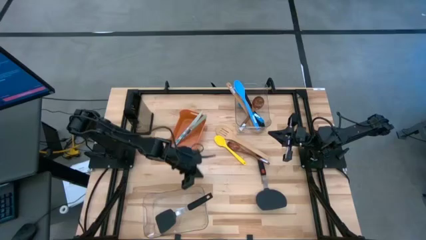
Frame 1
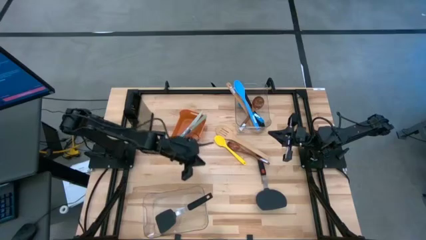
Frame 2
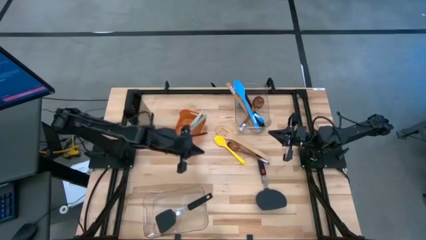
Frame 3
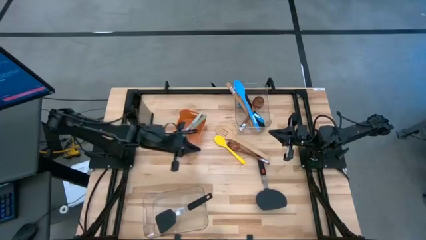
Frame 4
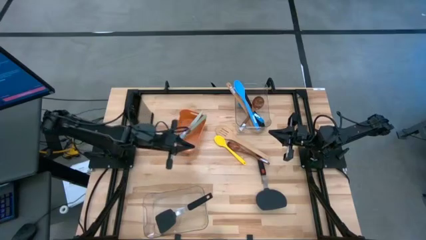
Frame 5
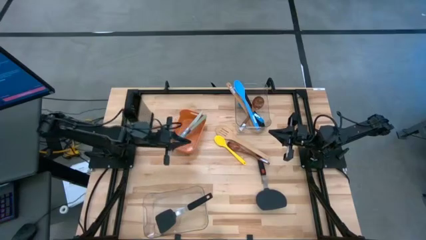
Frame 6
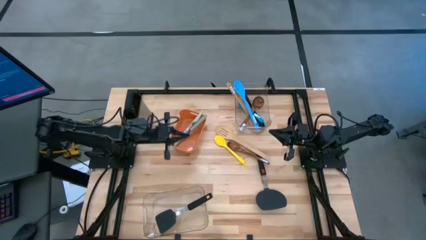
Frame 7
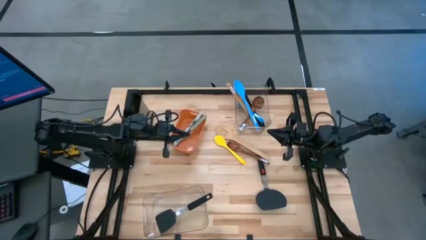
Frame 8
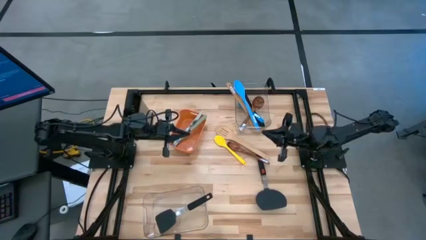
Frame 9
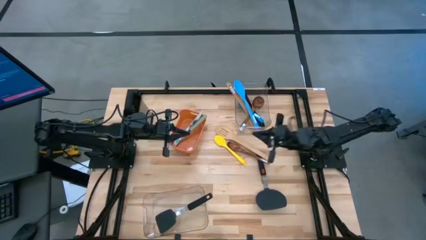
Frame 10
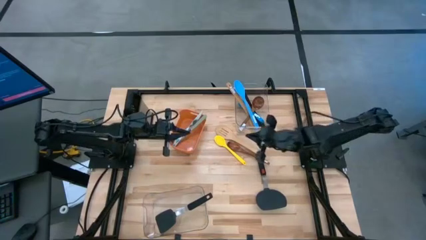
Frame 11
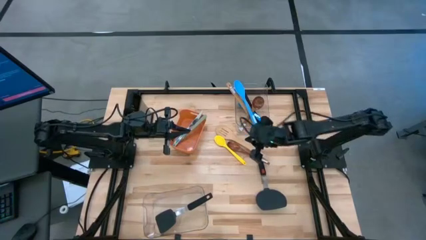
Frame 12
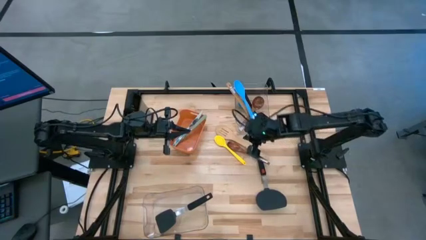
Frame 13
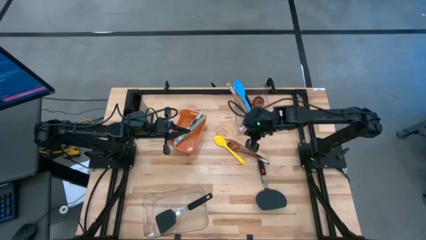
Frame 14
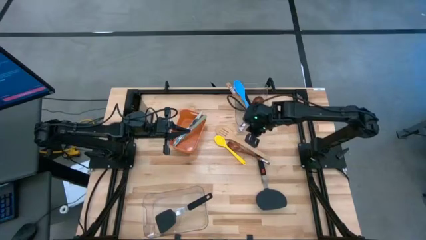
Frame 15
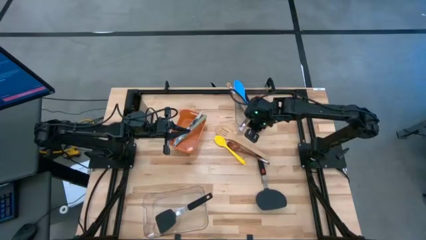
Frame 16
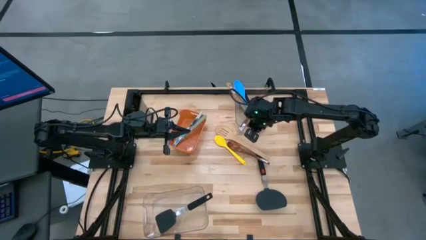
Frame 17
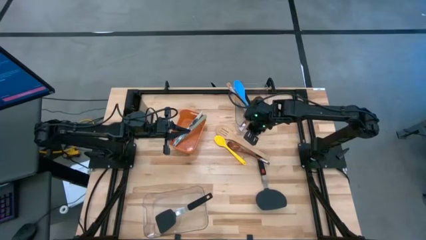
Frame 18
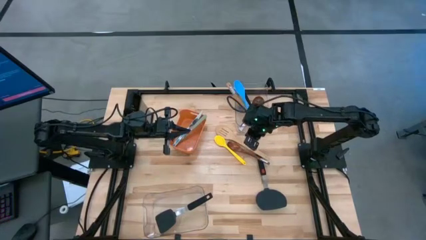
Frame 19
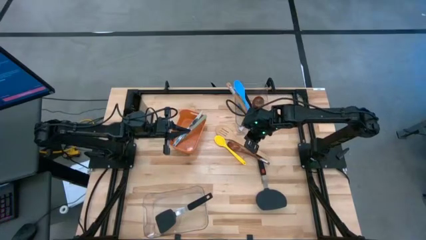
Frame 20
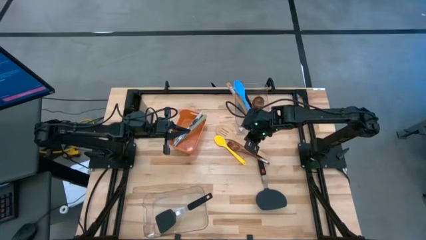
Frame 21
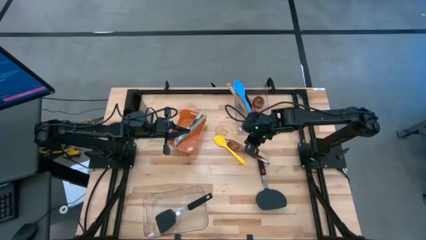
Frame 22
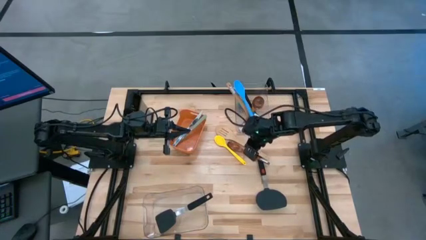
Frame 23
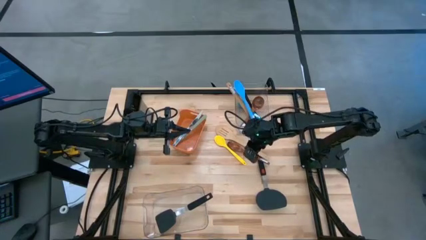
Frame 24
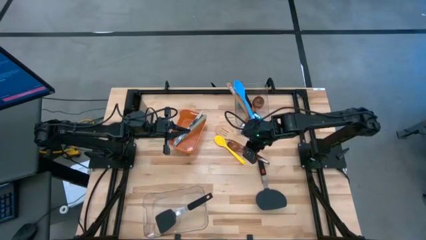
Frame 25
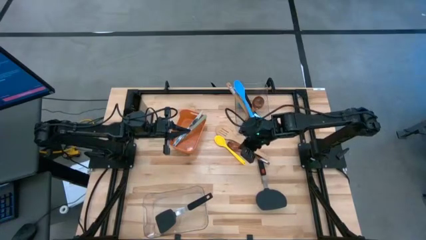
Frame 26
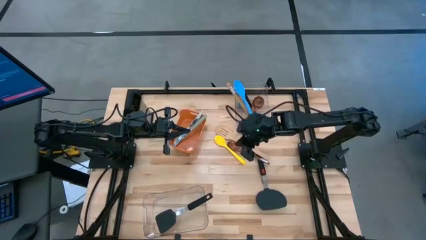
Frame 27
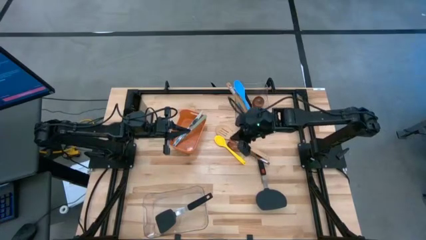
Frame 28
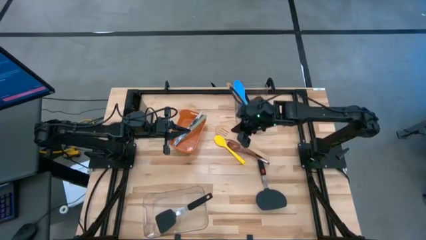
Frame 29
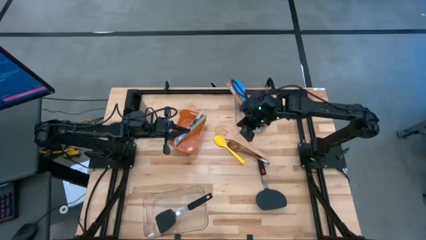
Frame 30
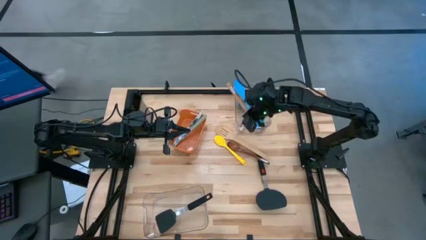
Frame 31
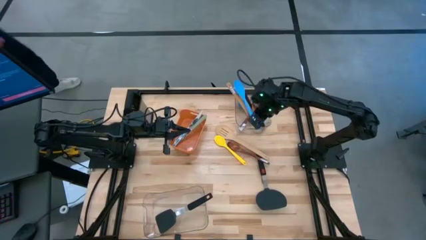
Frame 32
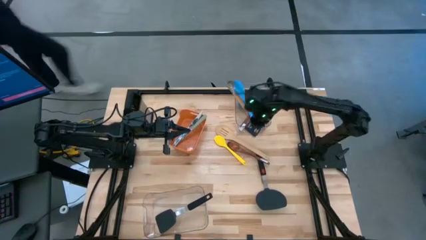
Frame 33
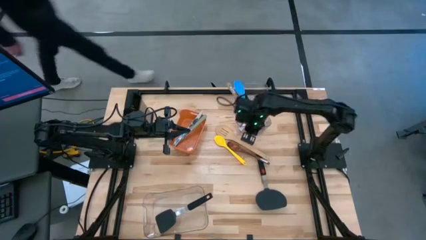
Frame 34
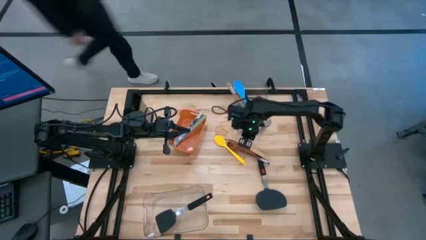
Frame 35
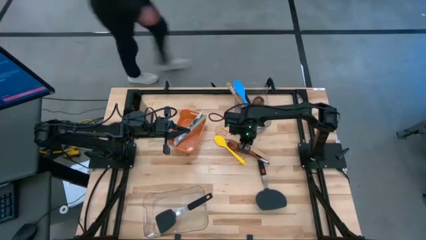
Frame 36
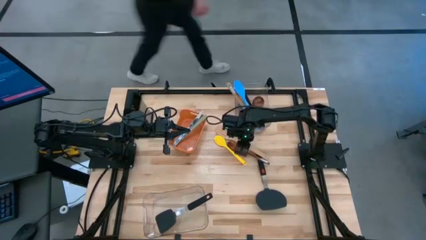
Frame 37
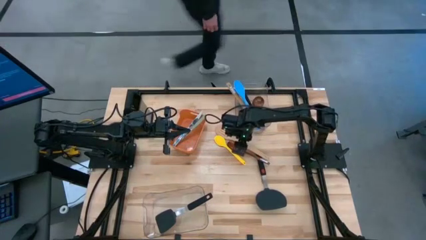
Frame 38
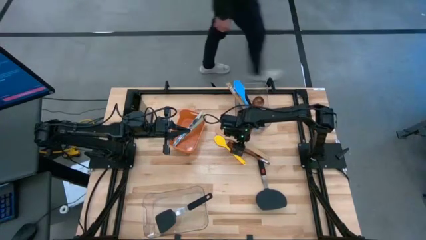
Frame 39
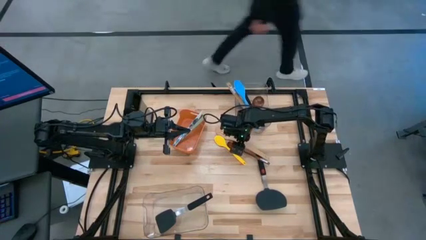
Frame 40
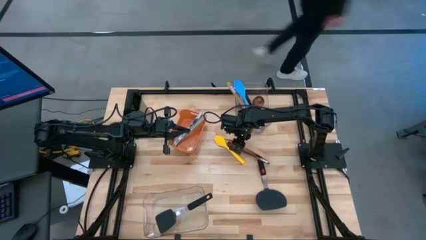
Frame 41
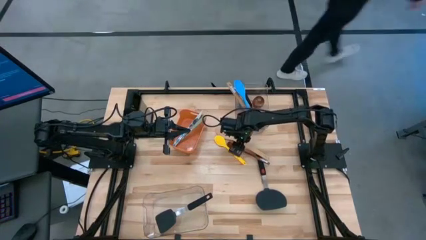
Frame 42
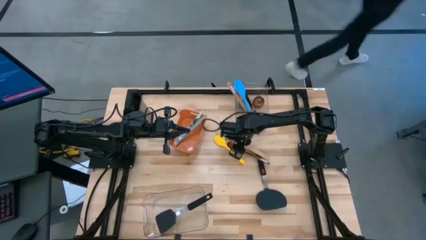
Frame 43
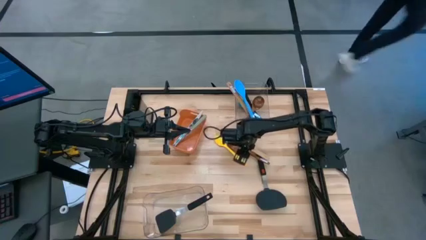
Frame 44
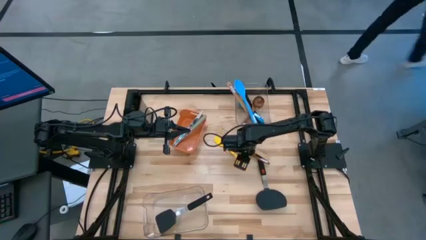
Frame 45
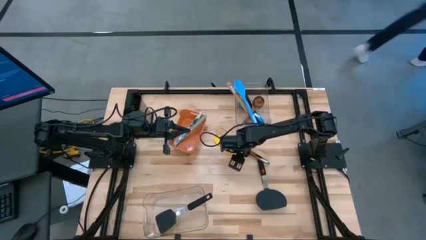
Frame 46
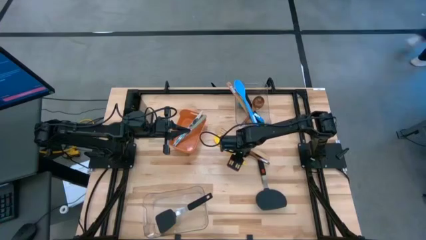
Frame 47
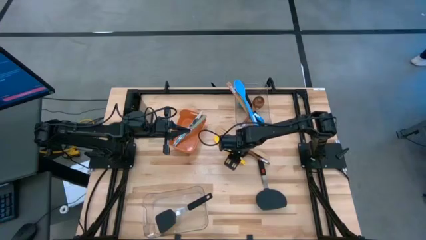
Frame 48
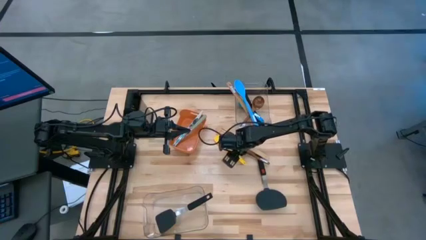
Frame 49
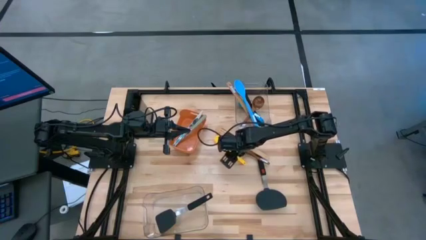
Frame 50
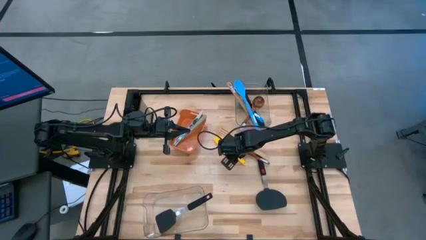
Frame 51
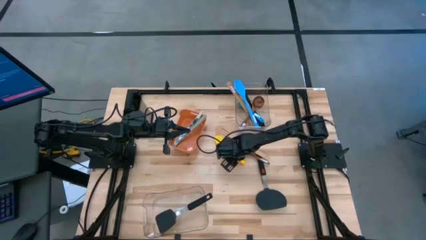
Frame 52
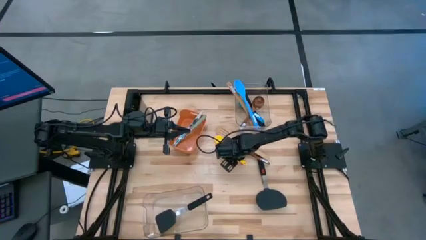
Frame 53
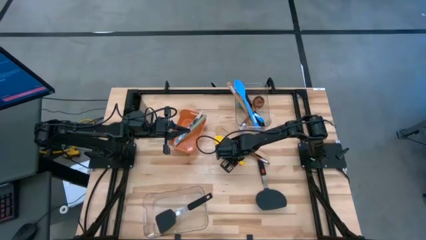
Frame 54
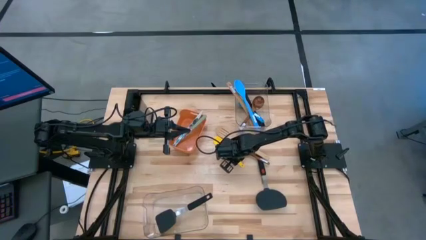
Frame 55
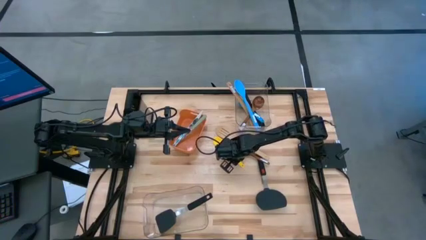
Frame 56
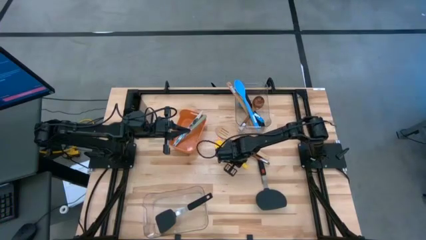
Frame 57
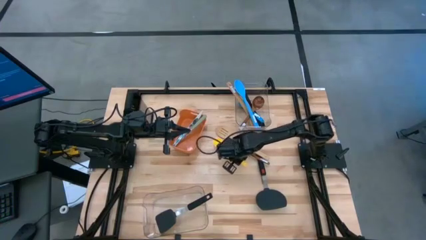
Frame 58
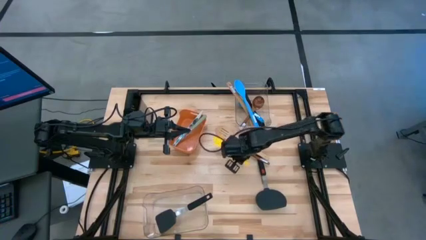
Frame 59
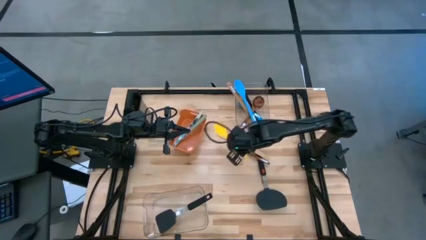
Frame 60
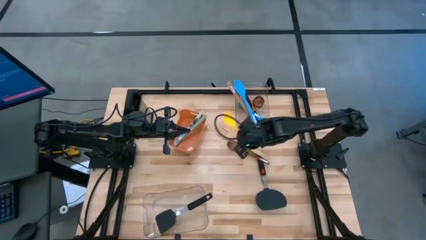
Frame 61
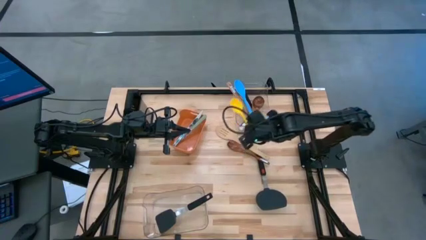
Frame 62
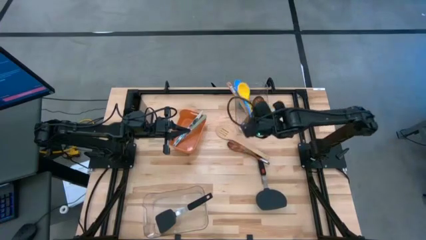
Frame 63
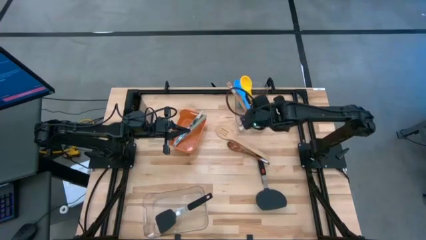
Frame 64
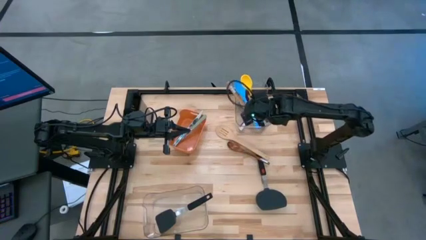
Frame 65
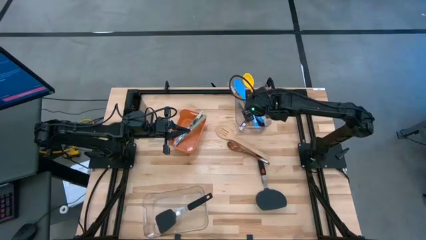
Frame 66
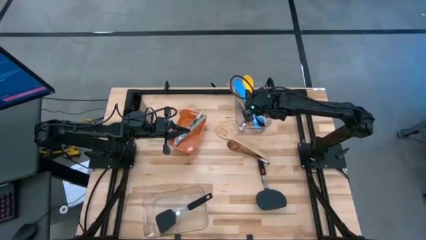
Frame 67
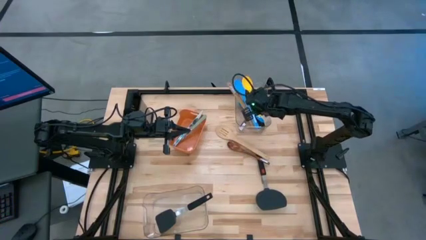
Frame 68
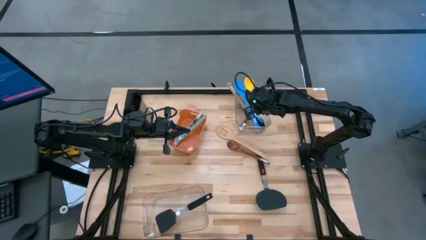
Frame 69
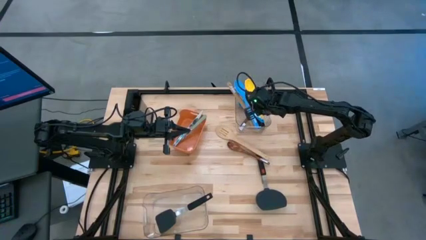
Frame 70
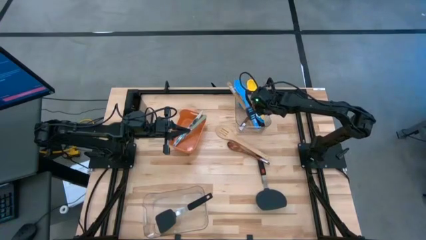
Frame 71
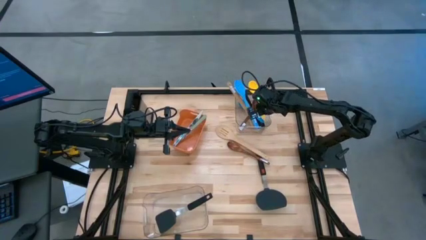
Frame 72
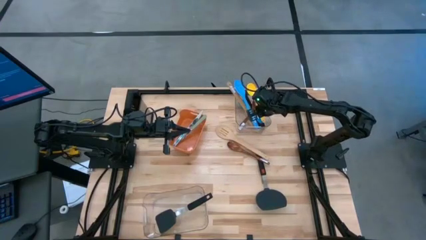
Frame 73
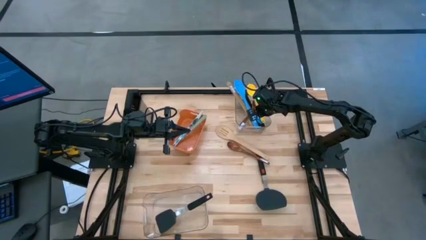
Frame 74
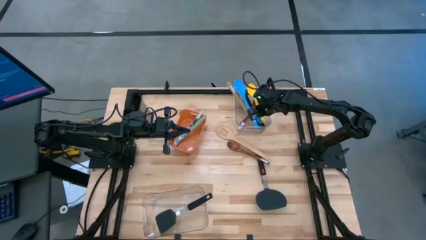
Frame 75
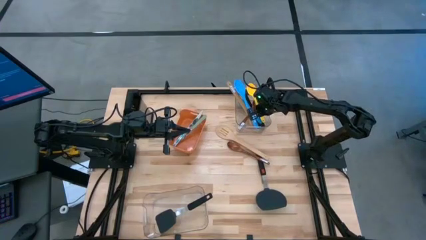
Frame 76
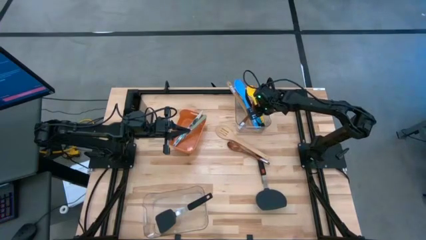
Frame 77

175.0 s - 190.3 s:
Task: Pick & Place Kitchen Items
Put the yellow serving spoon into the top transparent bin
